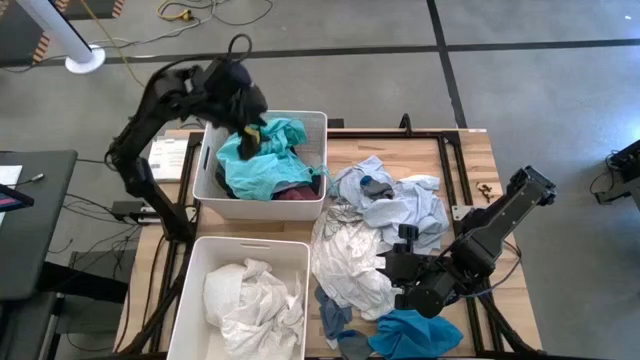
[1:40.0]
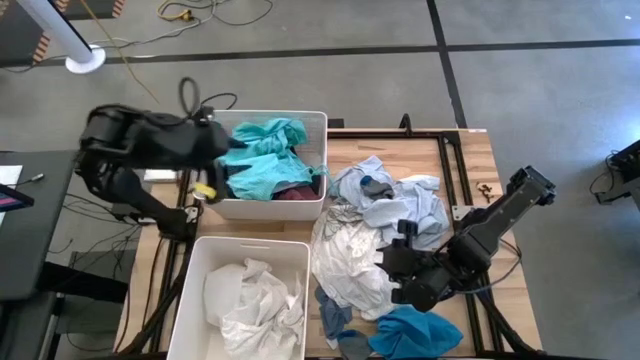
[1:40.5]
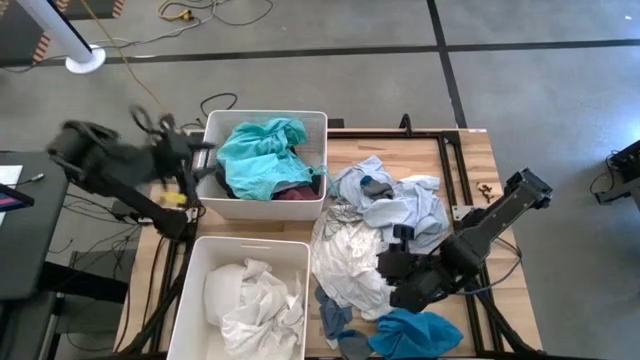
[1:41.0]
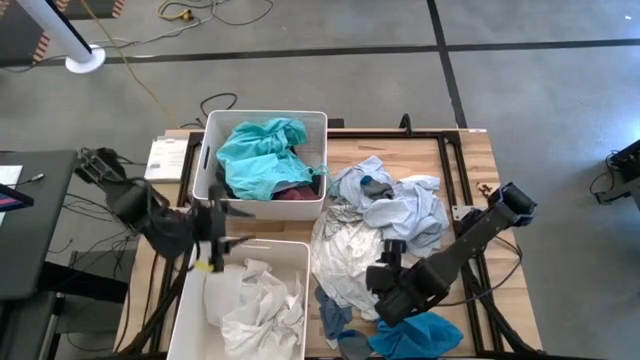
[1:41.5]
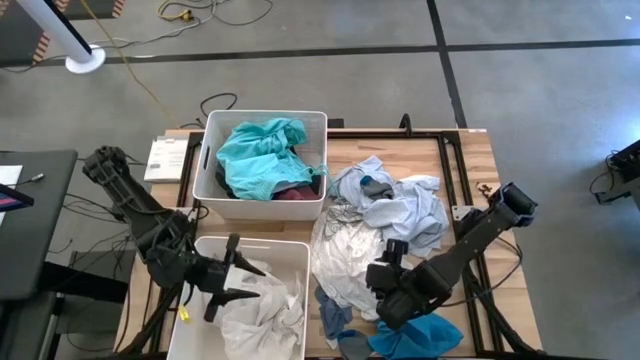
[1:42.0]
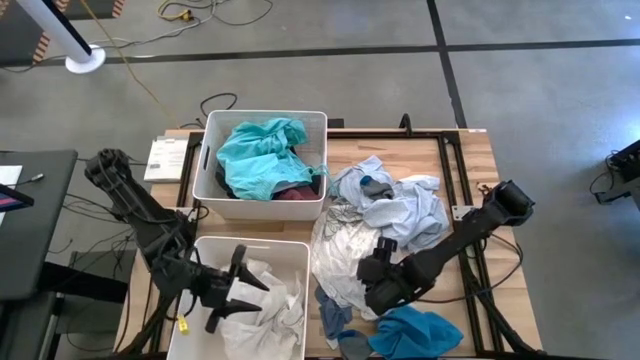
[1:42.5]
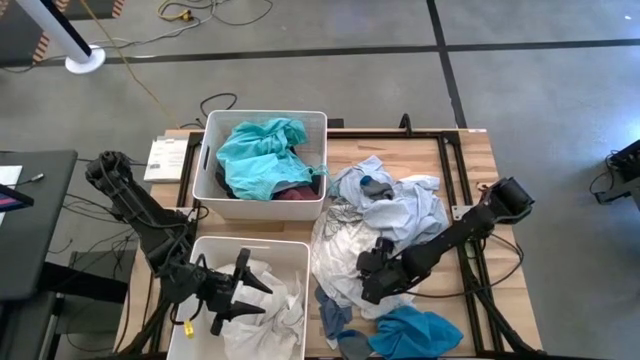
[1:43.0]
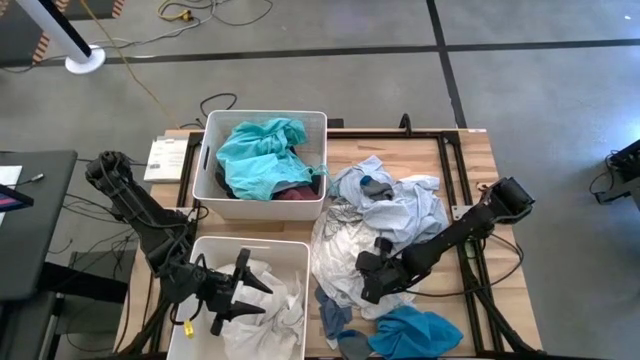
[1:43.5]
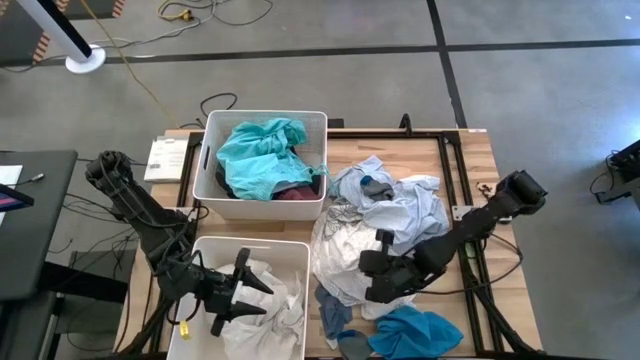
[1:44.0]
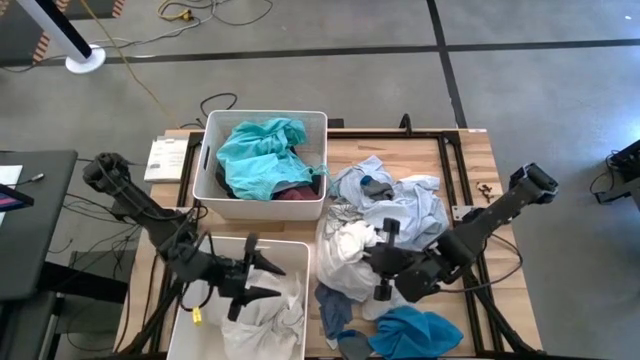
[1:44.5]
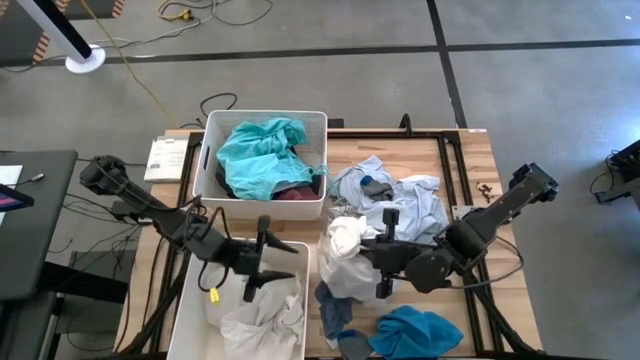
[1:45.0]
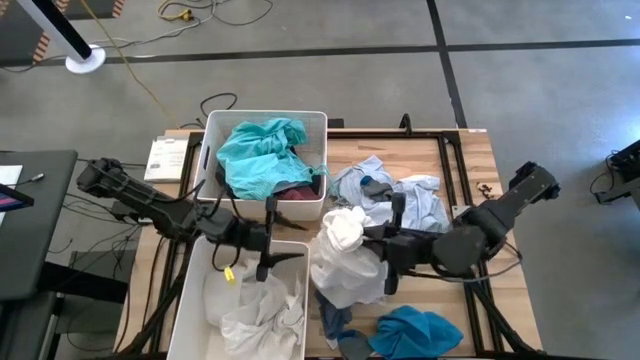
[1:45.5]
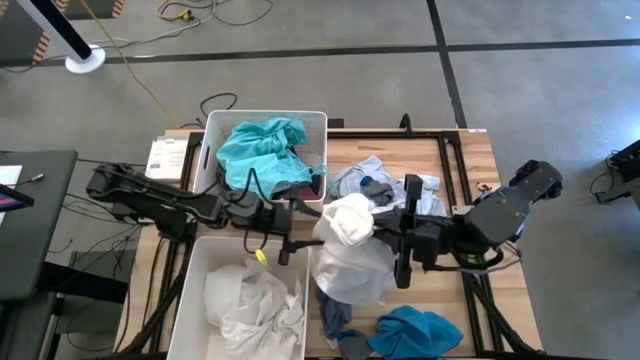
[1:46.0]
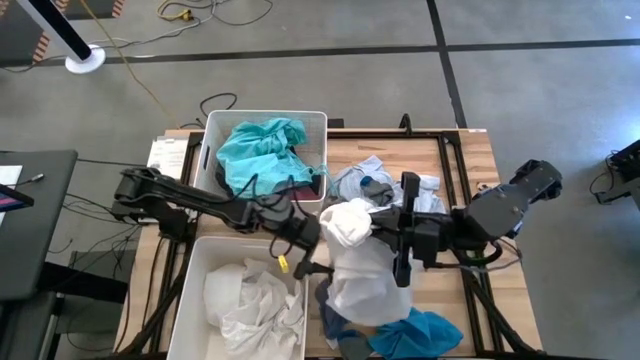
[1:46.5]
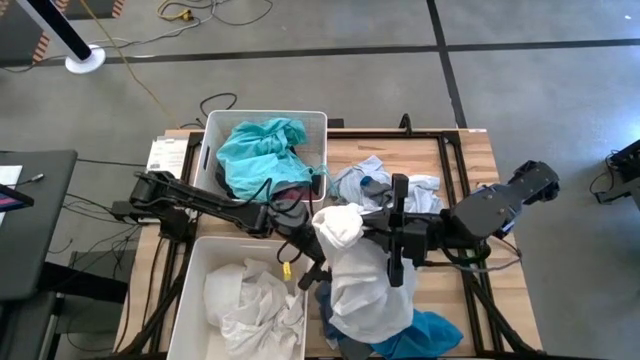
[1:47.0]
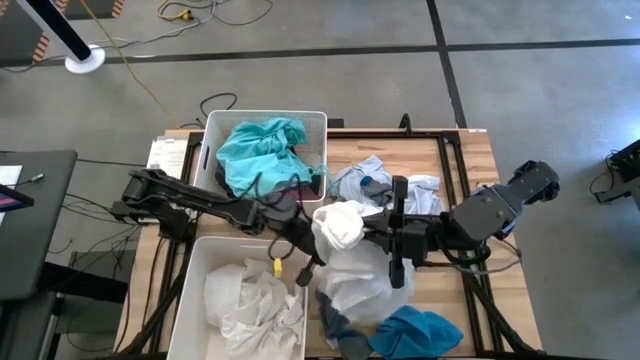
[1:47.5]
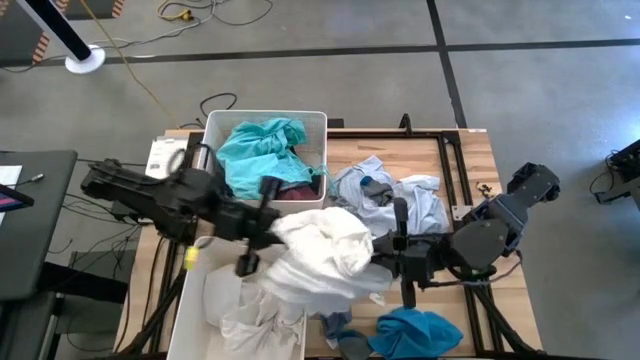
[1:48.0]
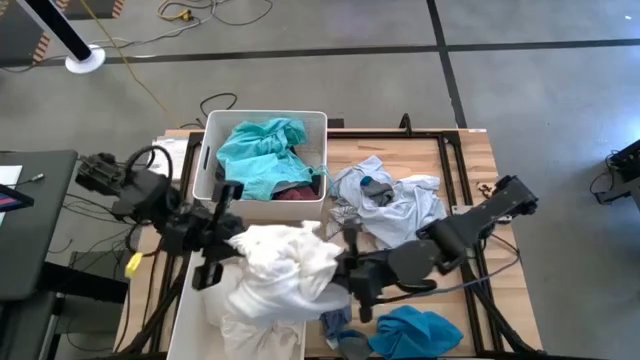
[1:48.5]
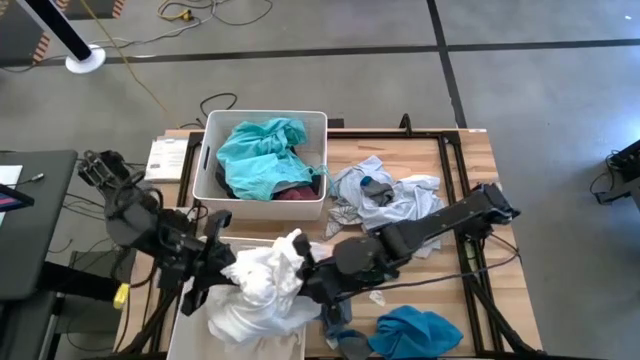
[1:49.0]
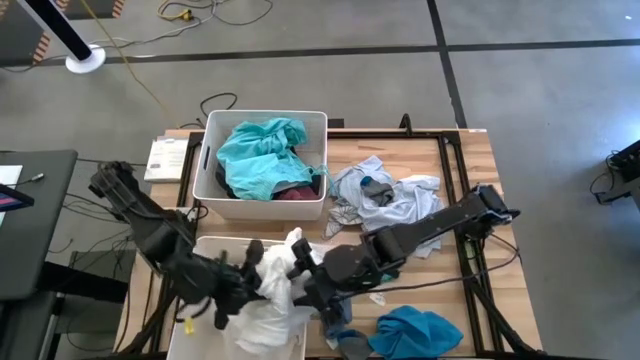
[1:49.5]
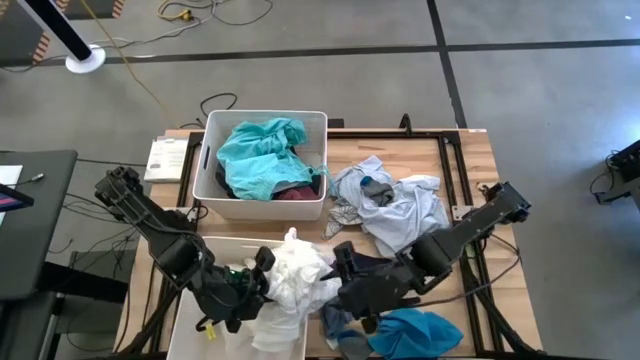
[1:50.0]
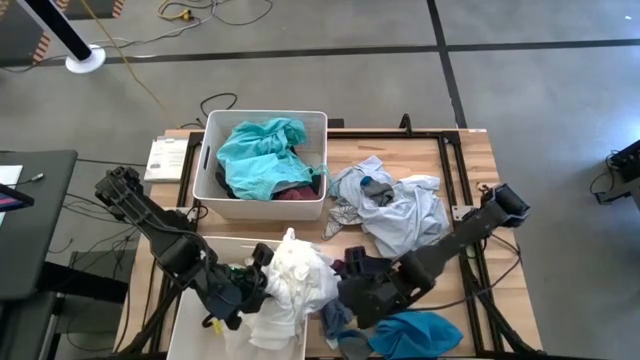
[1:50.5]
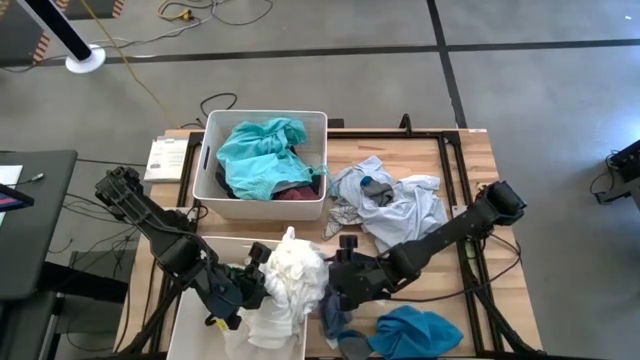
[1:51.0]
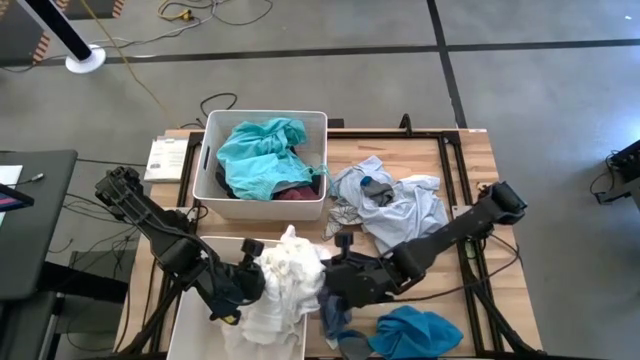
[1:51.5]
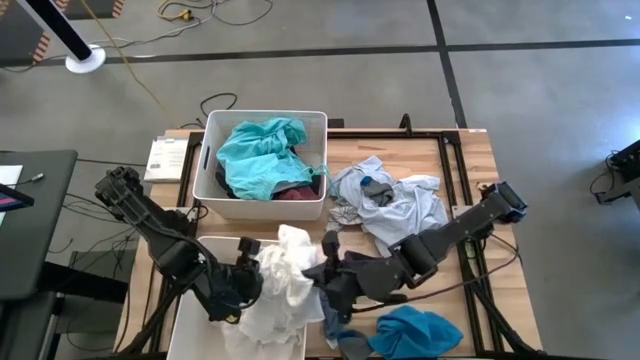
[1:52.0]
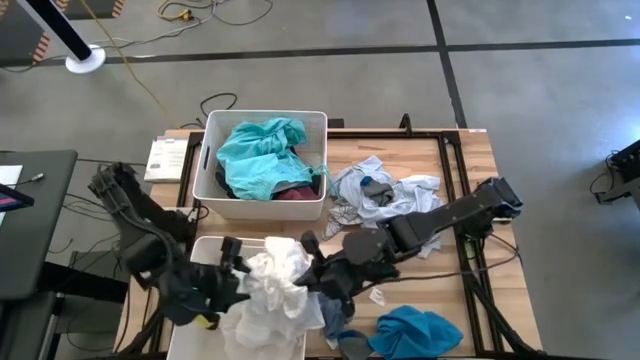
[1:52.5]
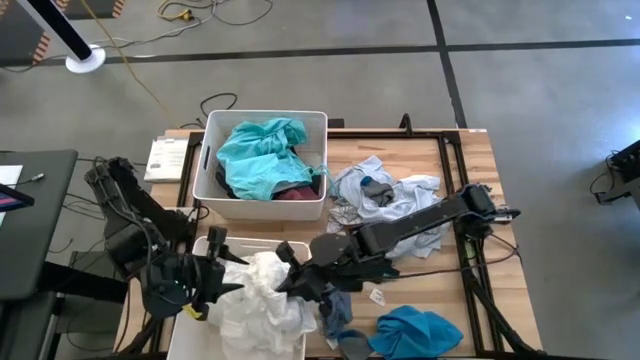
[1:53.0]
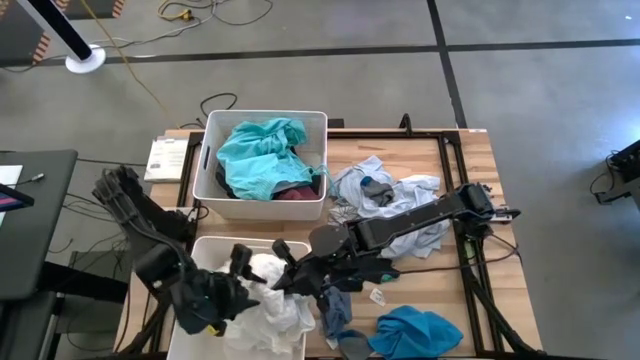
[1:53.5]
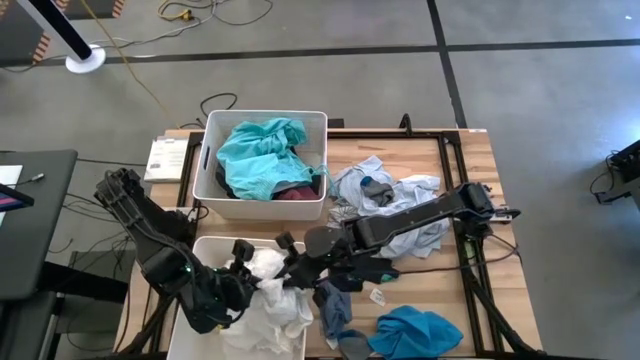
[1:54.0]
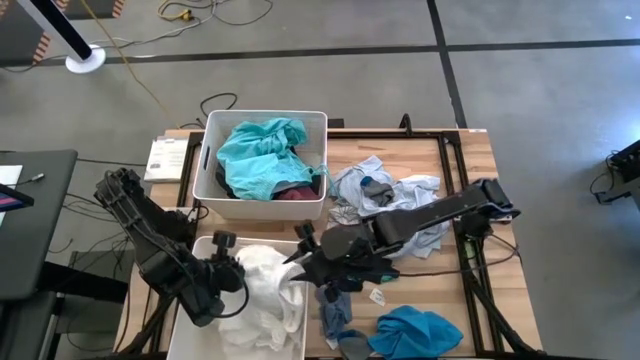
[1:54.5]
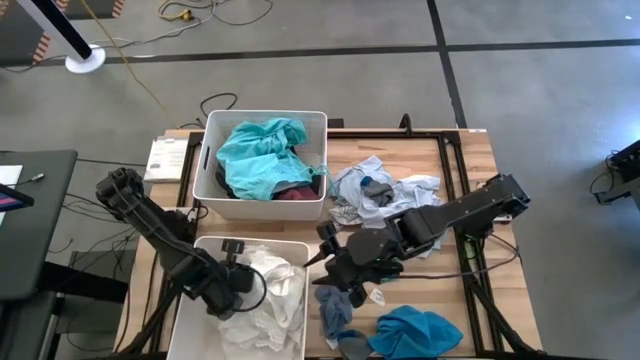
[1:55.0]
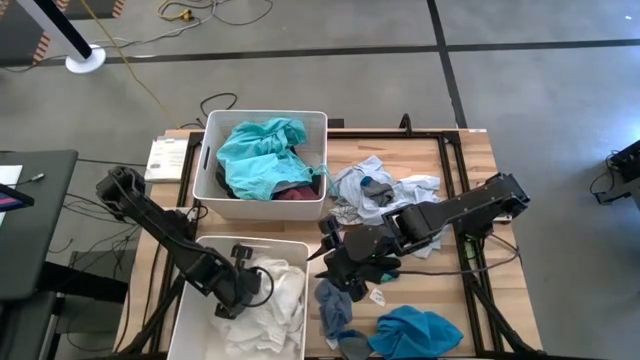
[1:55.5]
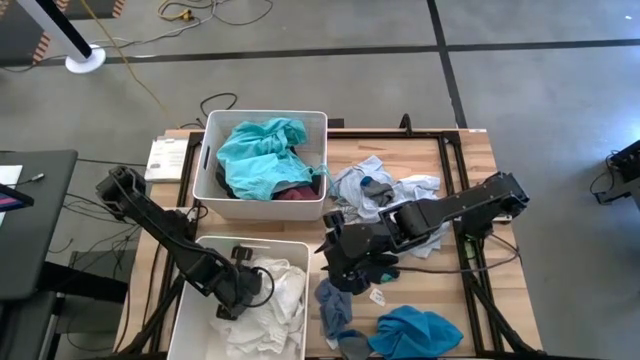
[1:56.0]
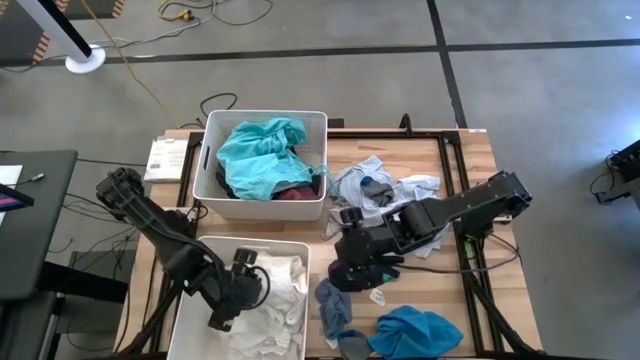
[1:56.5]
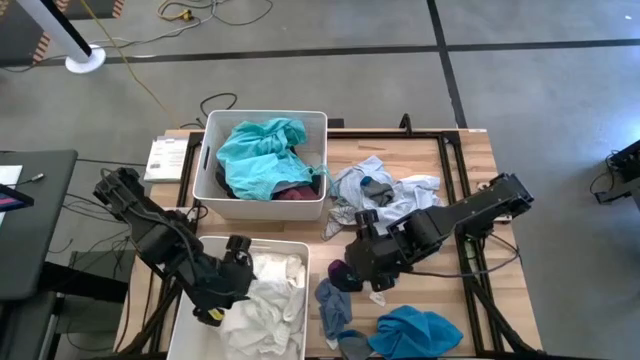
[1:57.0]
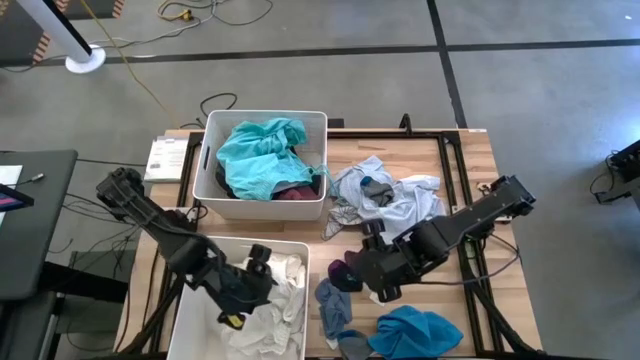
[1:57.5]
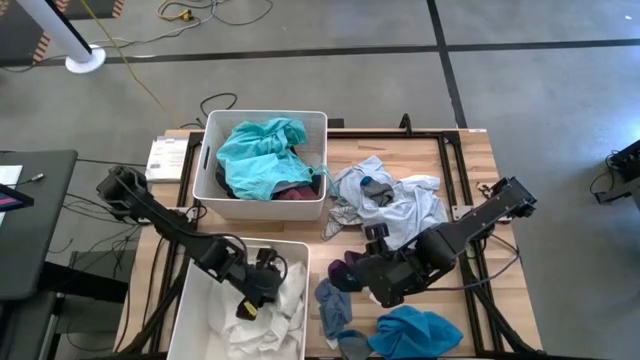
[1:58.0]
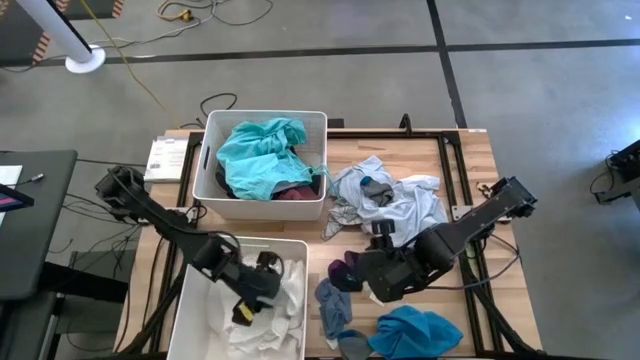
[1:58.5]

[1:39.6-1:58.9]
Task: Sort clothes
Put the white dress into the bottom white laundry bin

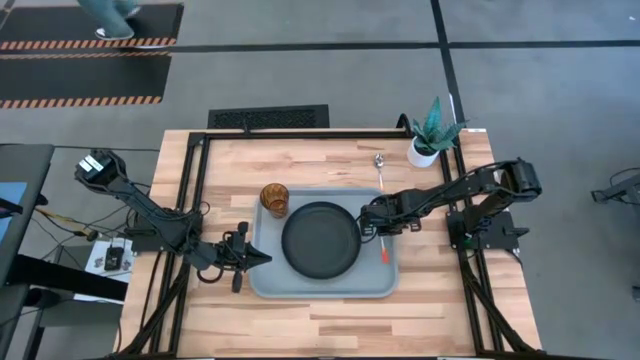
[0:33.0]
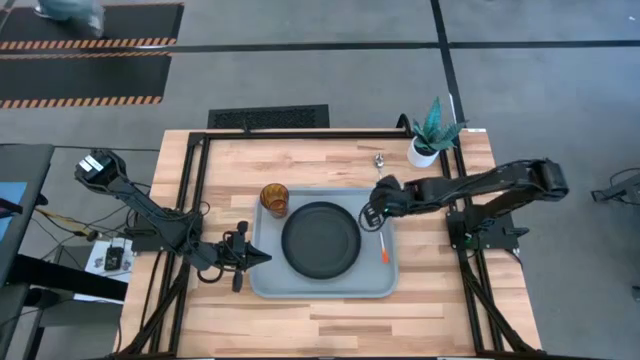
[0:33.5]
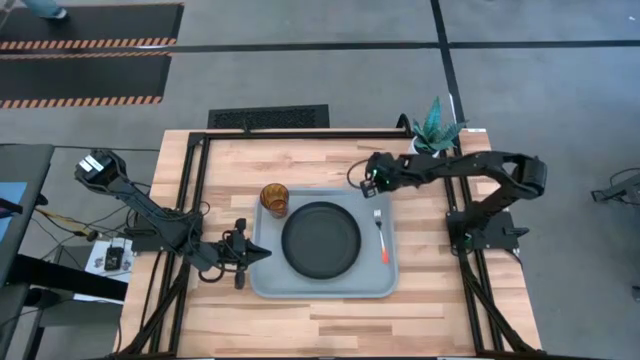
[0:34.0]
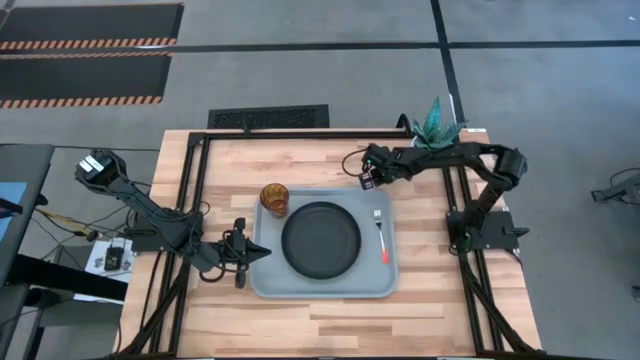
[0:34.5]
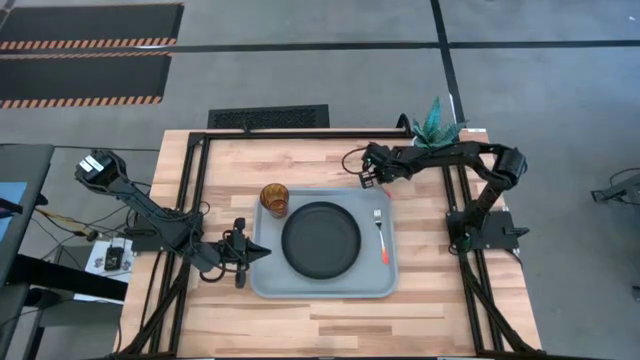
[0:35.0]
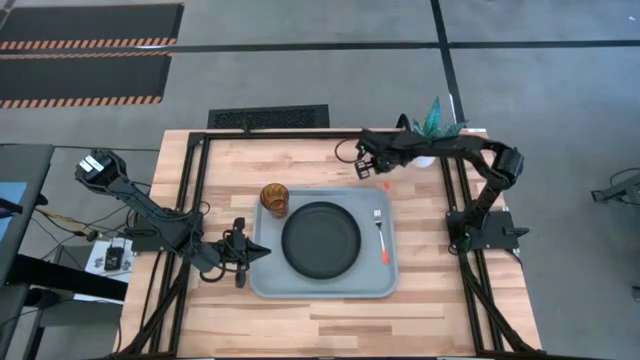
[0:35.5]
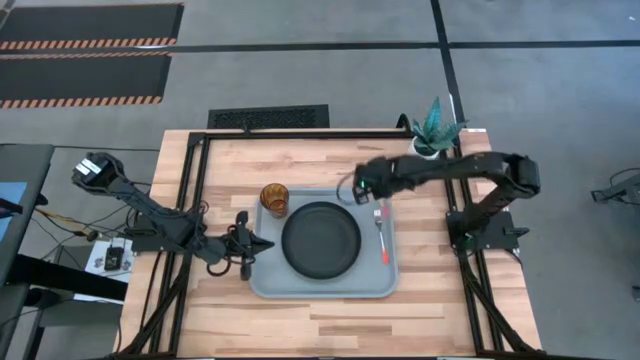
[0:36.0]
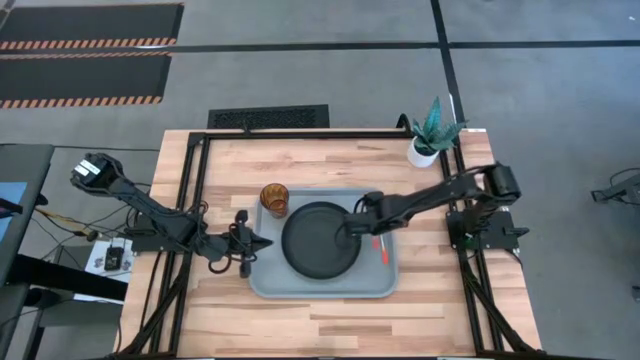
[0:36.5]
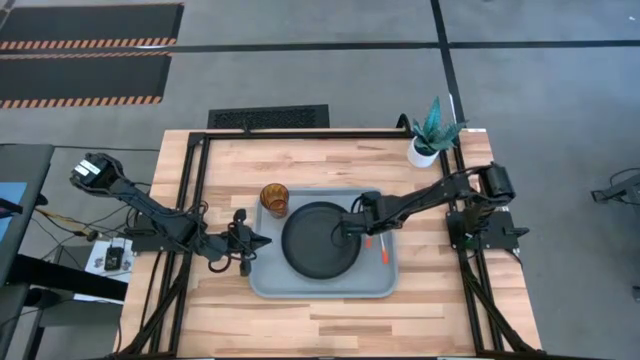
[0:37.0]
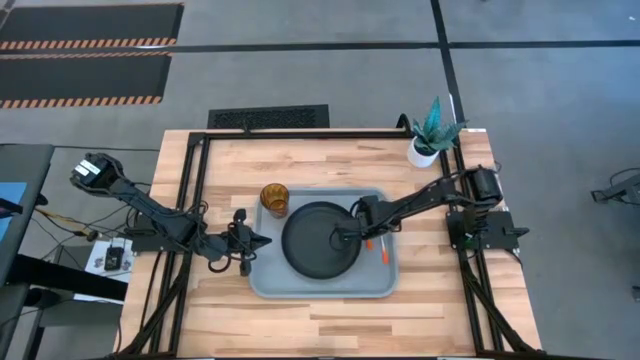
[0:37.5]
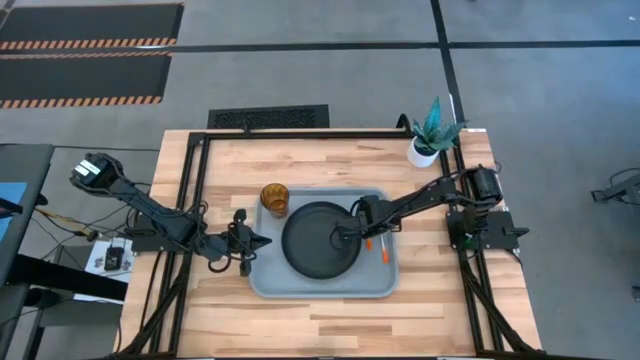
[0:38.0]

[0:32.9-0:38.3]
Task: Pick and place plate/cup/fork/spoon on tray
Put the orange spoon on the gray serving tray to the right of the black plate
